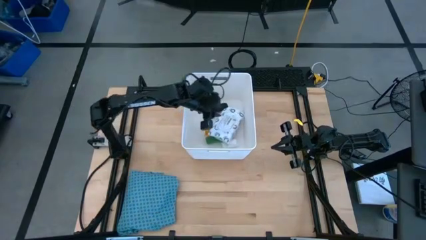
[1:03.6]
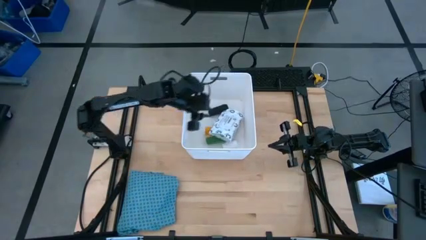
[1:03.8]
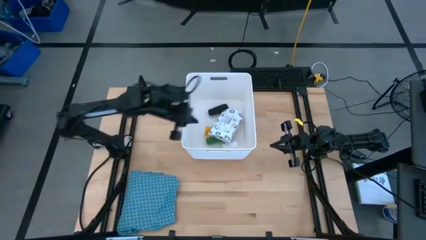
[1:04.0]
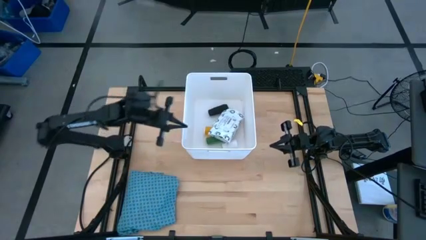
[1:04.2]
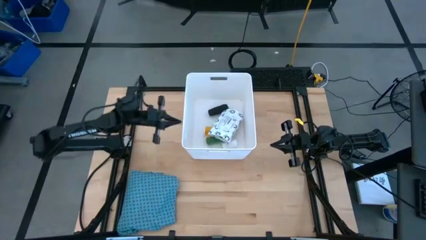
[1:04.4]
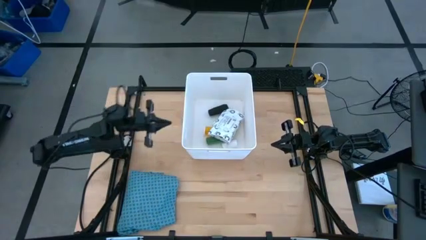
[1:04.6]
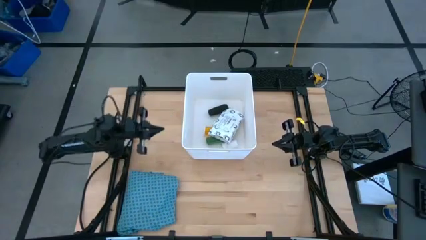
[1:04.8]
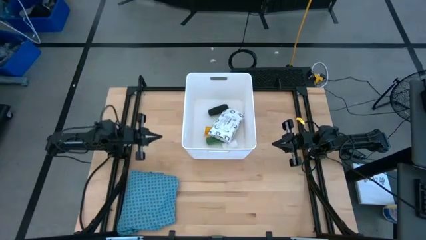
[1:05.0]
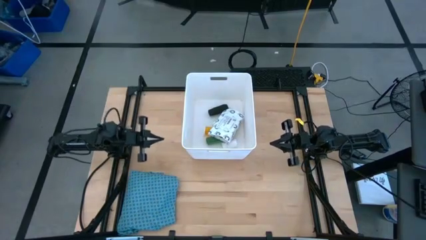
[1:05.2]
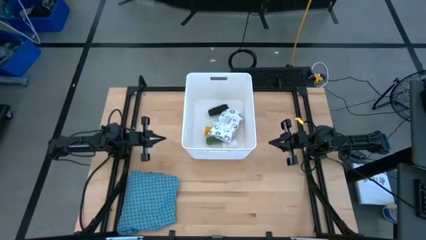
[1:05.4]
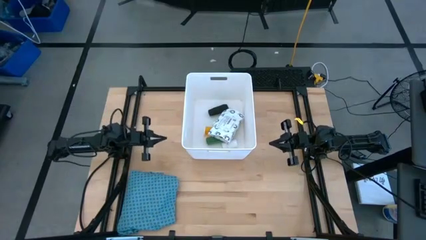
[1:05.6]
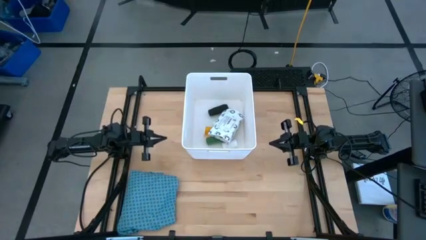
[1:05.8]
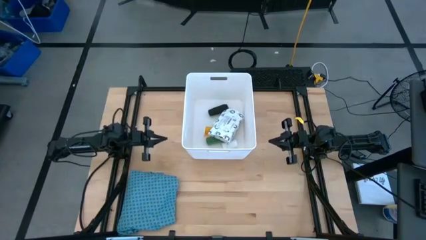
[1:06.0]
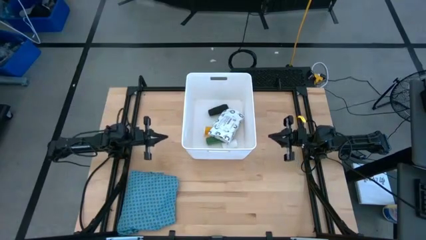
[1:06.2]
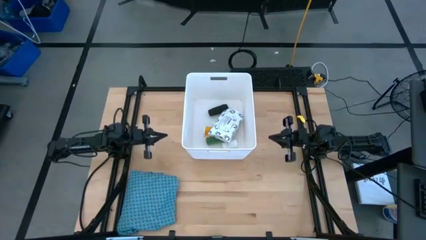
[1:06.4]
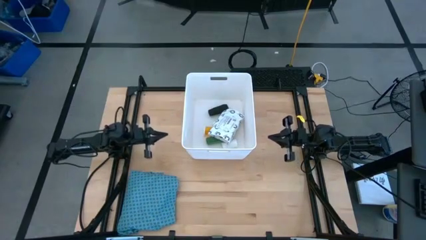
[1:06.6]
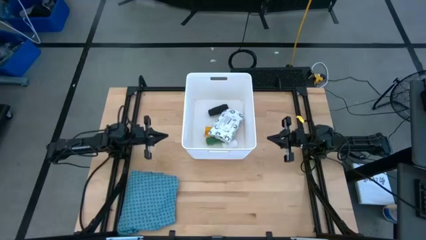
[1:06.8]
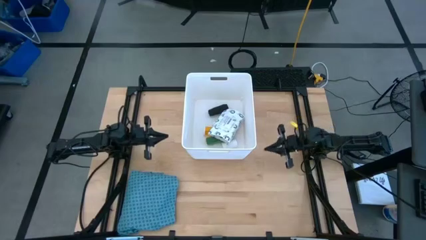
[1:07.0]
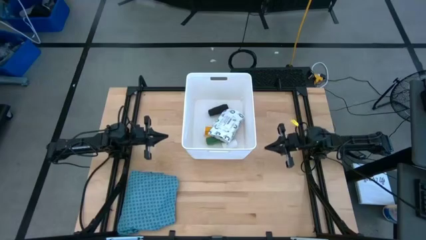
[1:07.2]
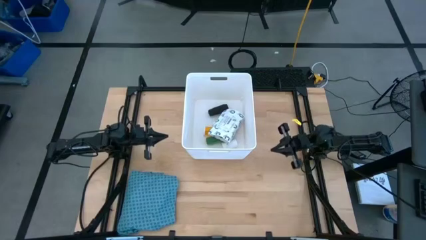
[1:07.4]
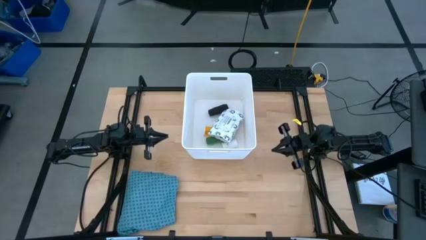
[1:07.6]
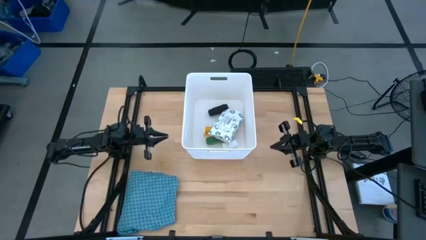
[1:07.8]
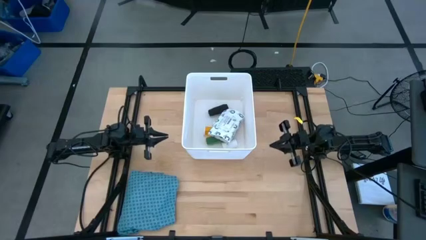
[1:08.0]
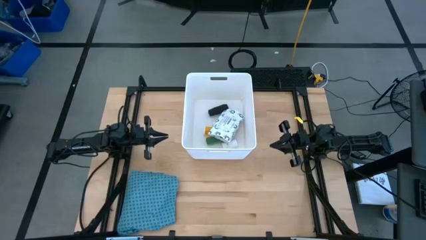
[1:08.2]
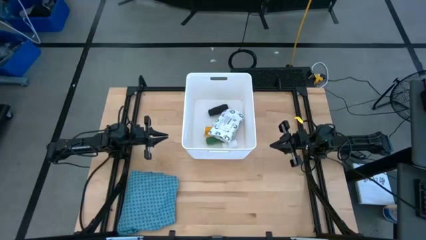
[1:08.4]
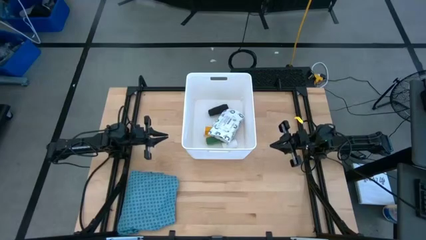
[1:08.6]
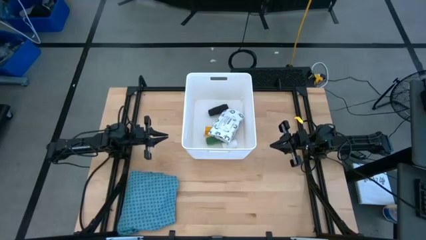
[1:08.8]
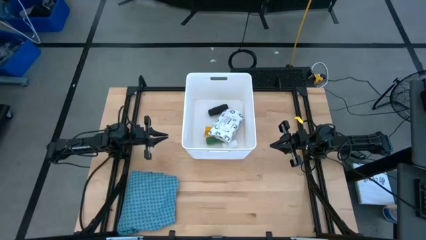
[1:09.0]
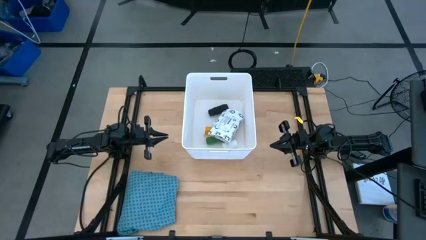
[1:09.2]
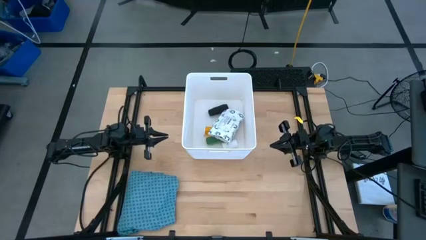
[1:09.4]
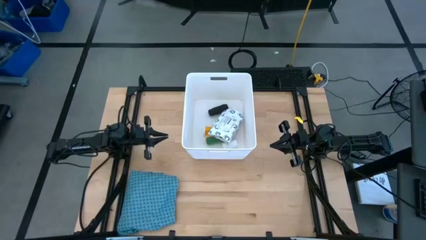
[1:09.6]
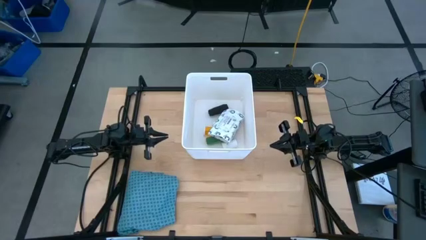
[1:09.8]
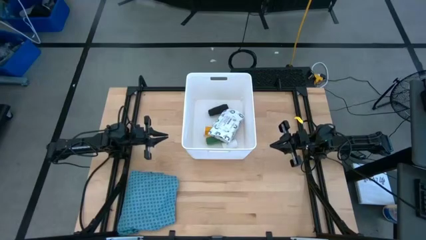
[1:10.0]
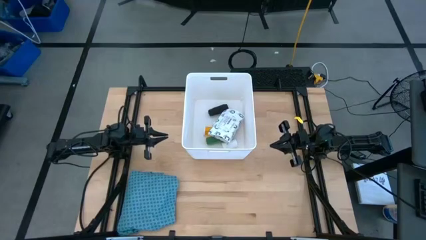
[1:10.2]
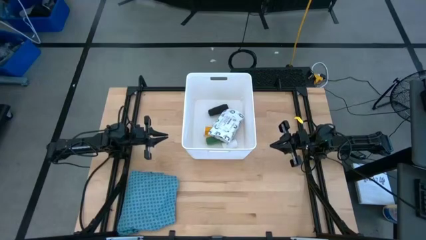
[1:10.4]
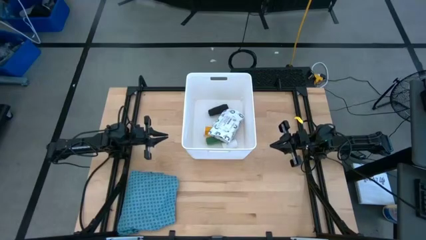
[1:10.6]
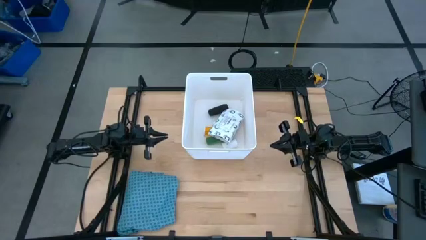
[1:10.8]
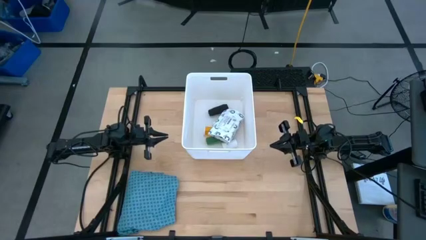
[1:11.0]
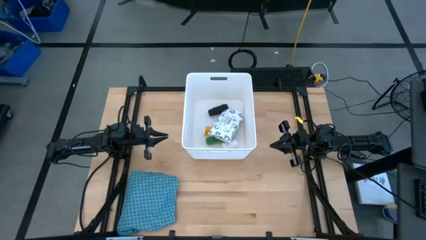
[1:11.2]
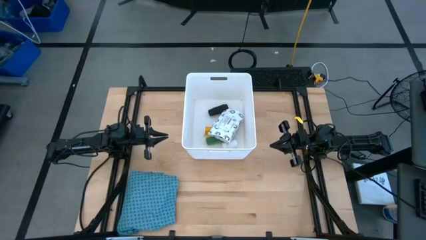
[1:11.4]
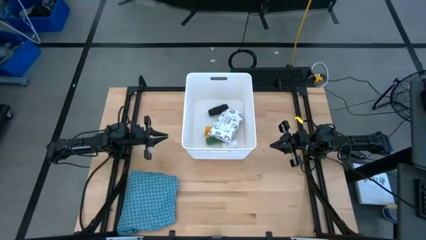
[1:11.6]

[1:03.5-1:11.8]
Task: Pick & place medical supplies in basket/bin
Return to Home Position

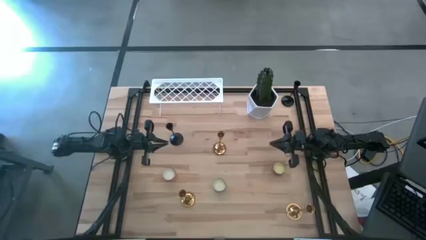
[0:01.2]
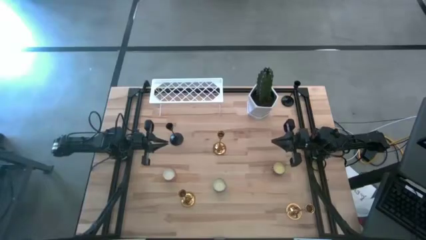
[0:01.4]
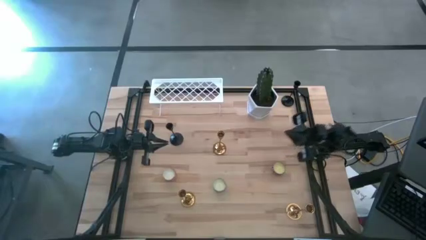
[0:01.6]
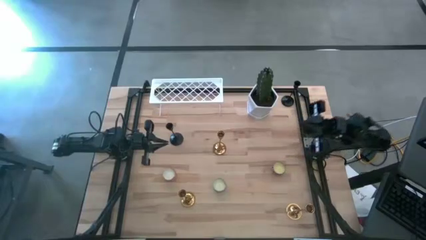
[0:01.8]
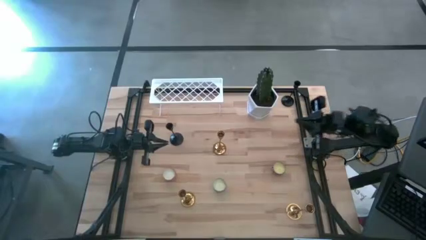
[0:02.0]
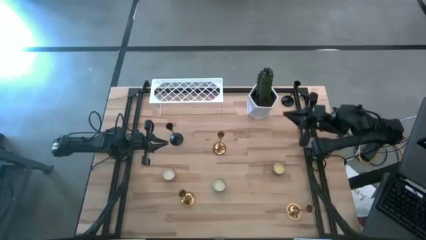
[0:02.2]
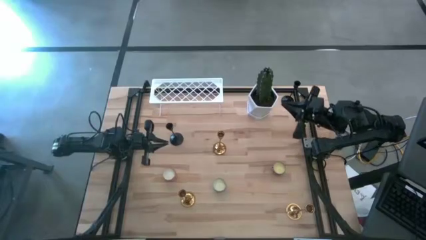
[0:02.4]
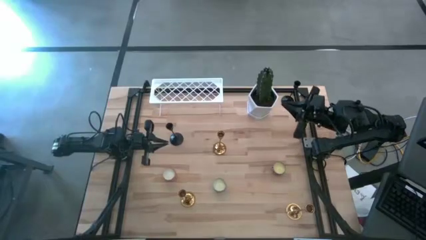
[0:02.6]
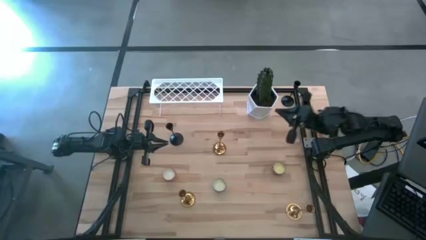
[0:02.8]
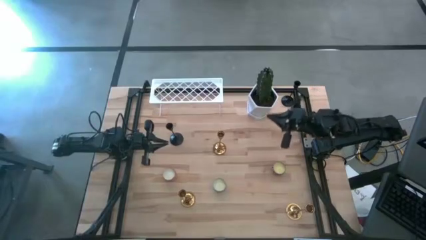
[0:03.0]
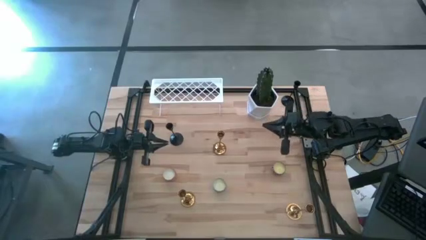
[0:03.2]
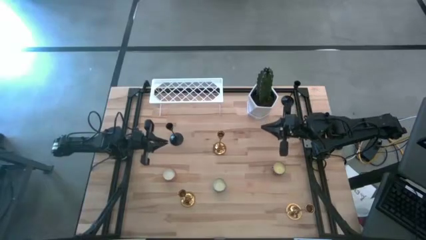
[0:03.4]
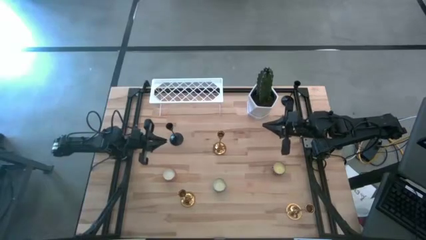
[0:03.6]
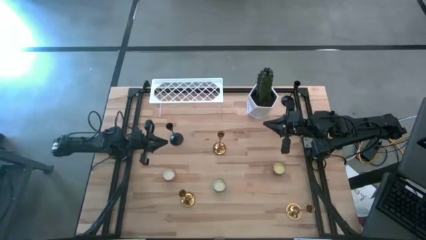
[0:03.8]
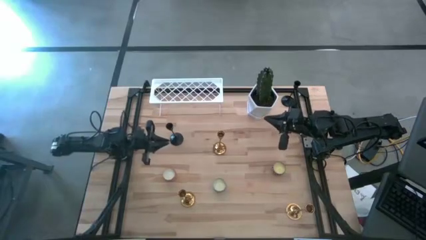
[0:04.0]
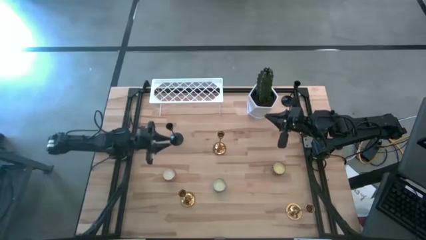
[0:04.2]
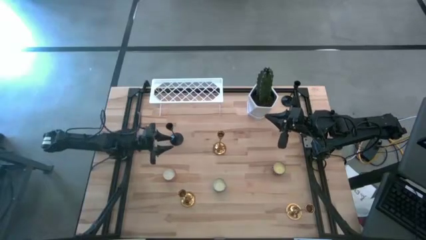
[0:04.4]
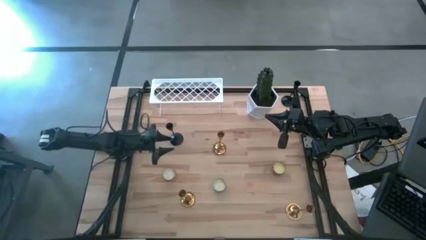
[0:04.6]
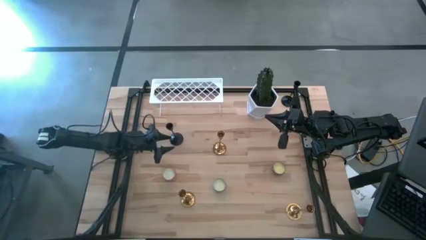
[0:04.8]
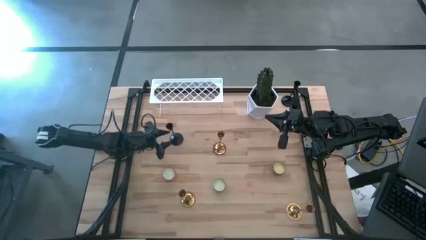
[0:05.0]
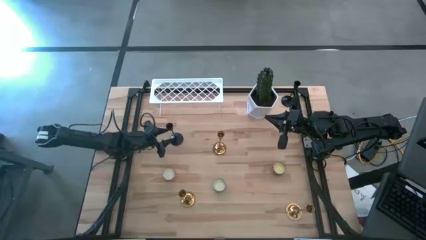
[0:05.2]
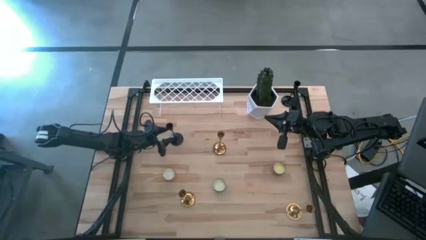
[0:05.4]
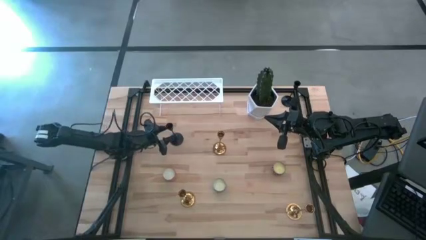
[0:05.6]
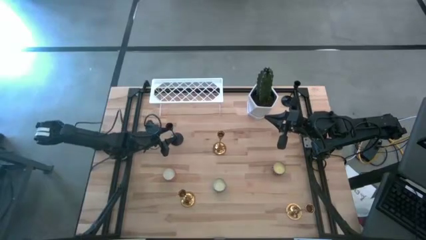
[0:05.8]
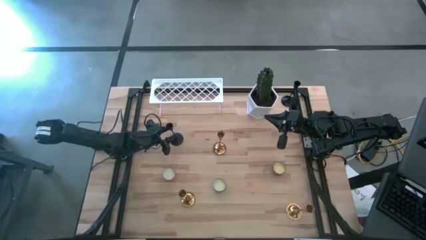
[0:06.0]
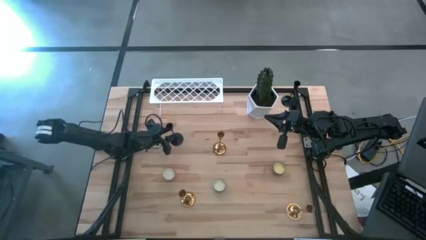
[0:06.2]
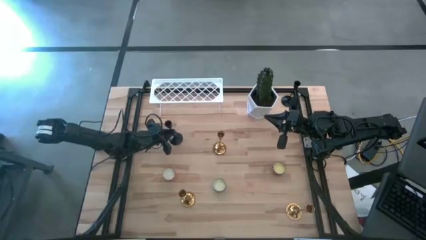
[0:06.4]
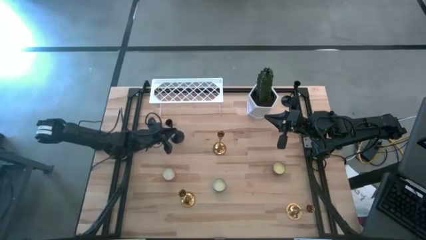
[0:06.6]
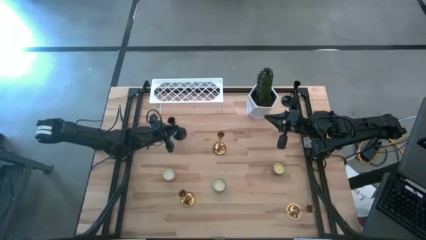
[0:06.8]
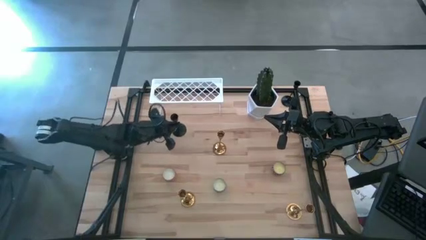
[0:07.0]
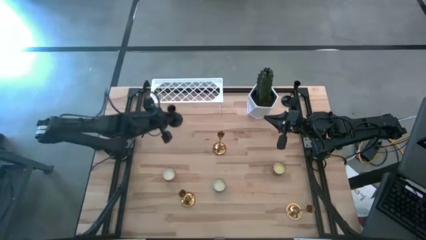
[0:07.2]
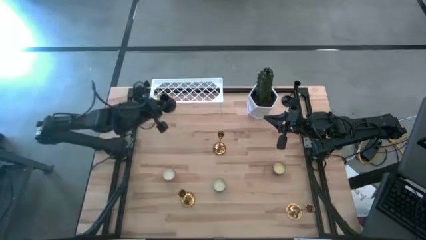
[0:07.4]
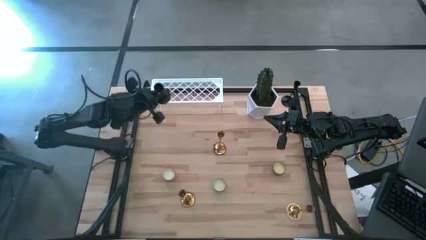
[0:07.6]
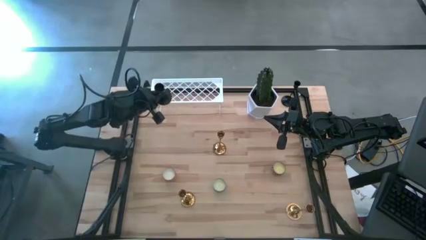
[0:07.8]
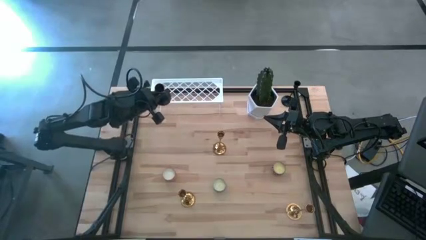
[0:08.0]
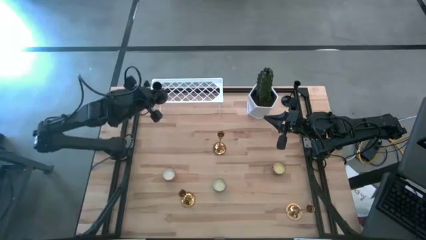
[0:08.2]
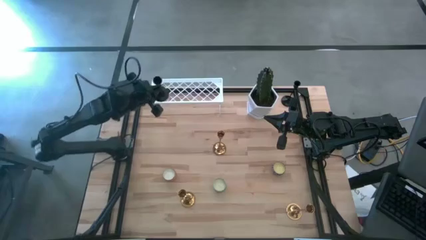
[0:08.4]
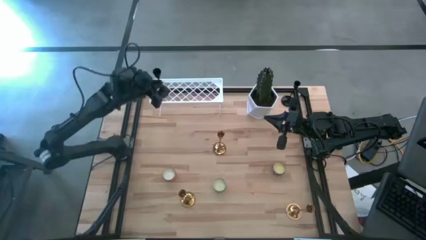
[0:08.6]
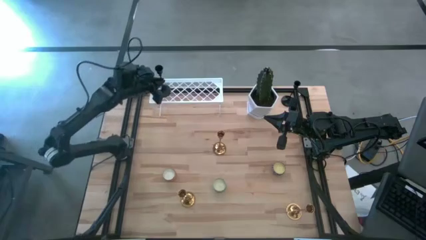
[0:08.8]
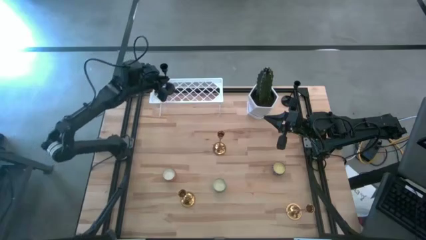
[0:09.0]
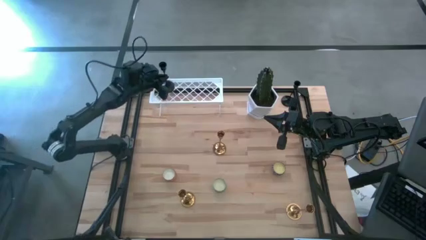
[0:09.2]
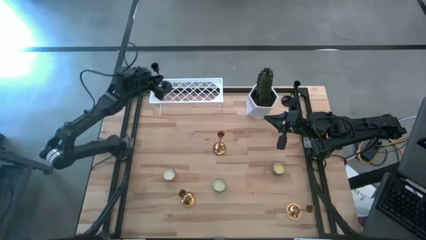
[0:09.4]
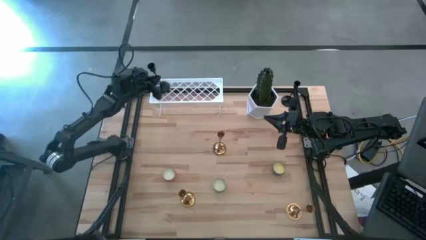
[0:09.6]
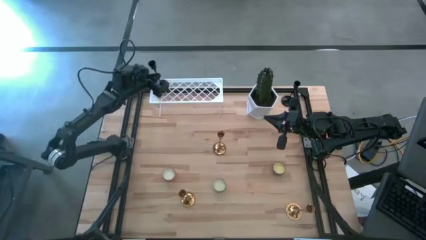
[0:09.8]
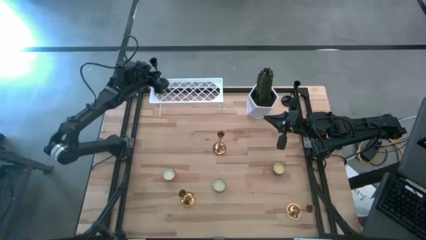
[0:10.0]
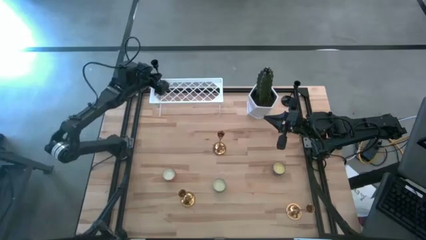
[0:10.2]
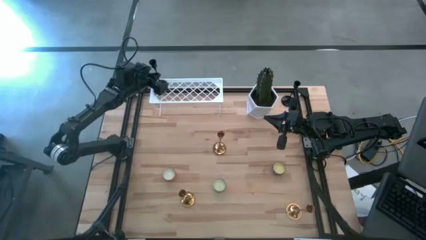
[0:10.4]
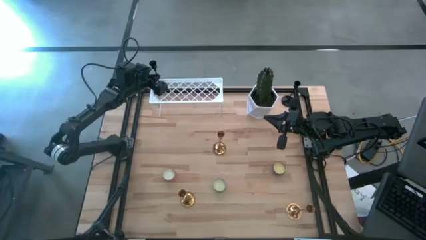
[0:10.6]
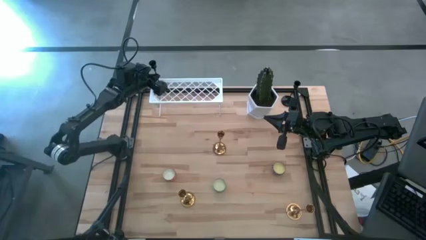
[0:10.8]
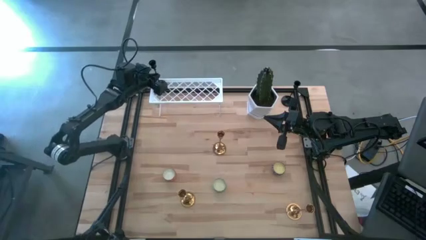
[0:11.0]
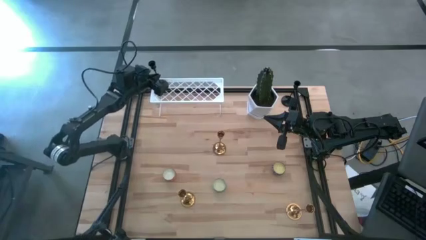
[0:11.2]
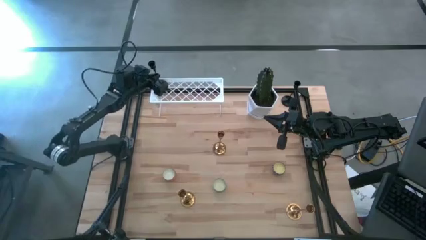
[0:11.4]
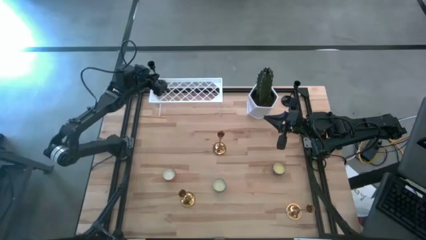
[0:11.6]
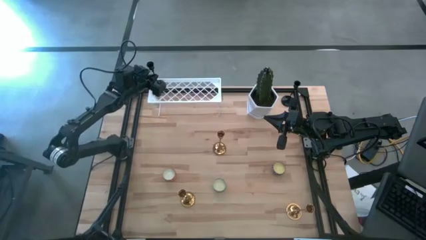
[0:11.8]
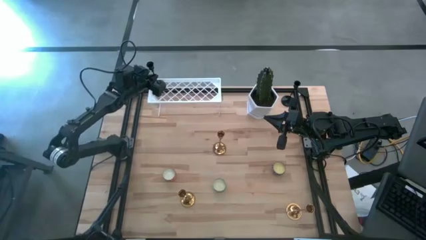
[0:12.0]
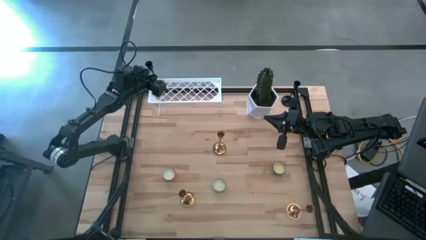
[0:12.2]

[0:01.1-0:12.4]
Task: Pick & Place candle stick holders
Put the bottom black candle holder on the shelf
